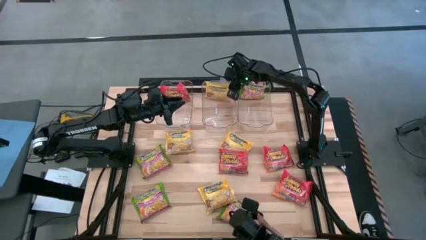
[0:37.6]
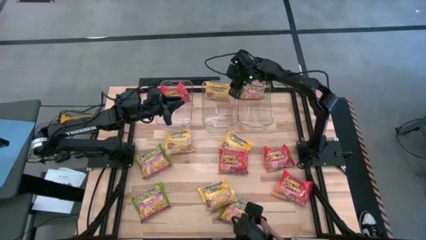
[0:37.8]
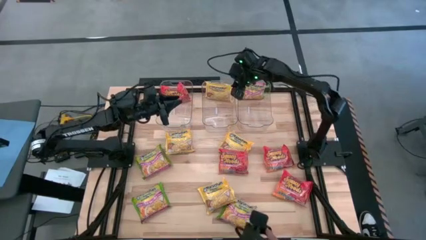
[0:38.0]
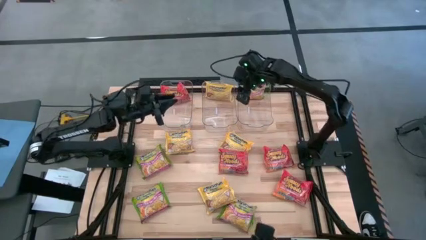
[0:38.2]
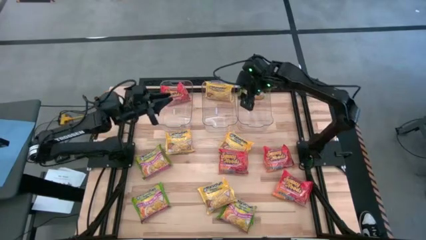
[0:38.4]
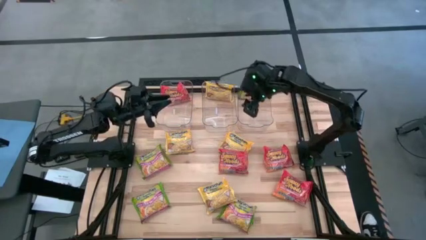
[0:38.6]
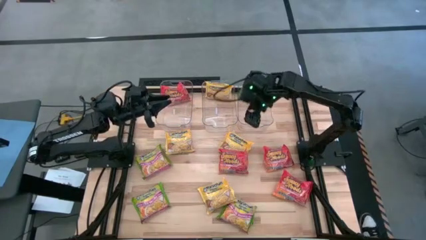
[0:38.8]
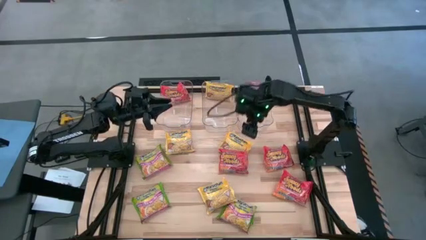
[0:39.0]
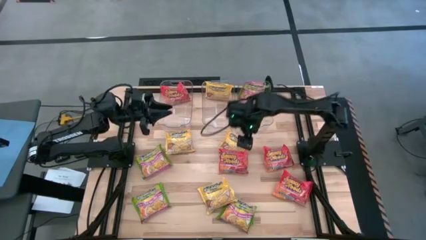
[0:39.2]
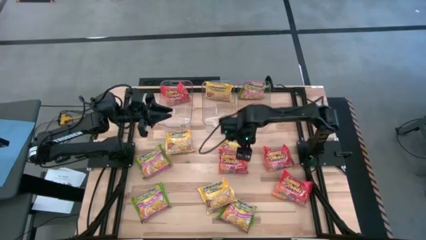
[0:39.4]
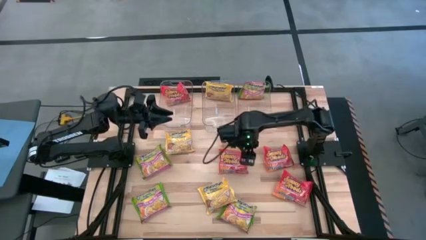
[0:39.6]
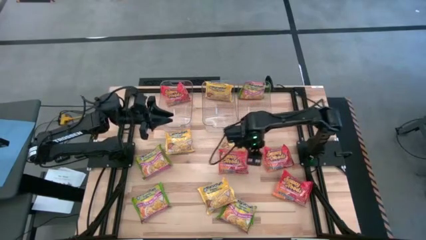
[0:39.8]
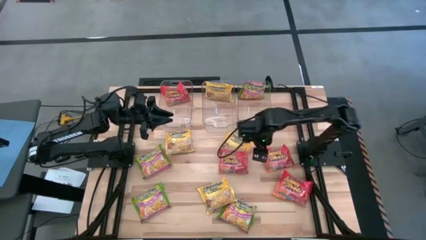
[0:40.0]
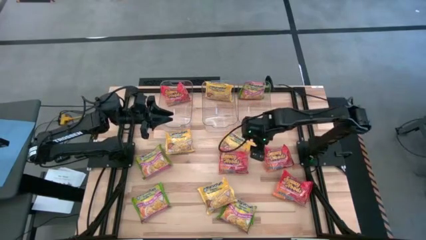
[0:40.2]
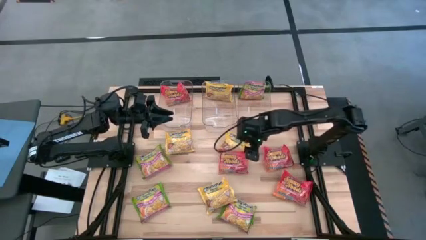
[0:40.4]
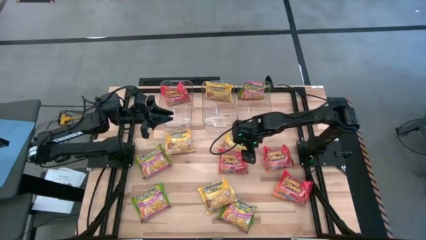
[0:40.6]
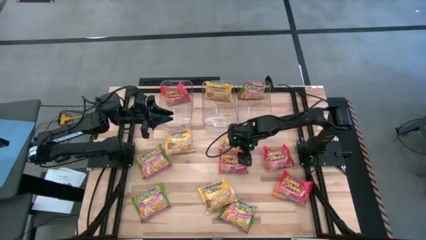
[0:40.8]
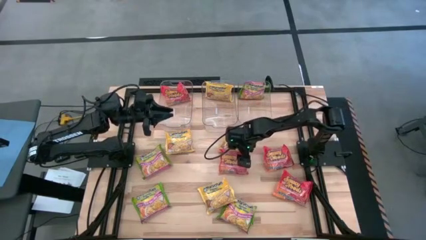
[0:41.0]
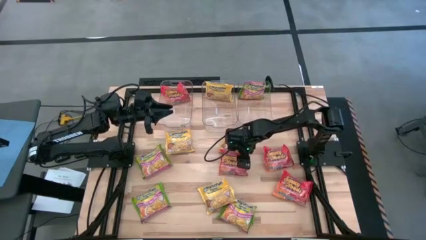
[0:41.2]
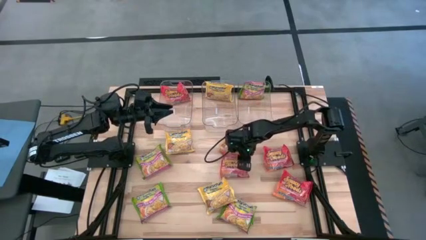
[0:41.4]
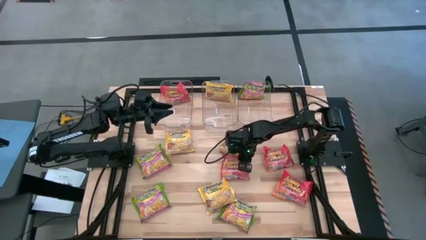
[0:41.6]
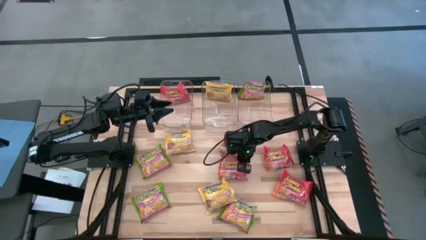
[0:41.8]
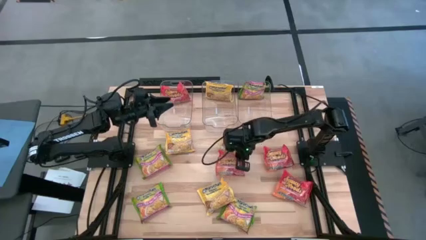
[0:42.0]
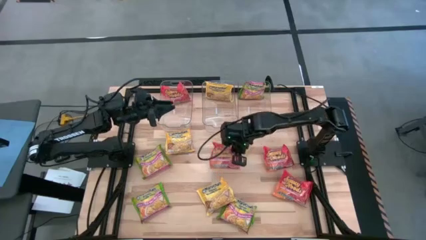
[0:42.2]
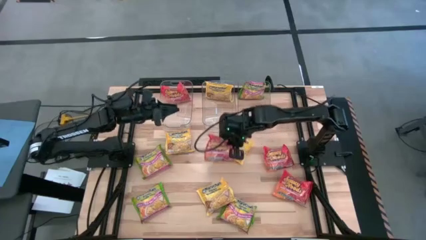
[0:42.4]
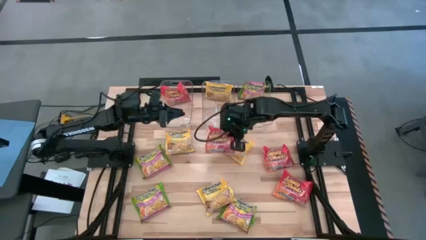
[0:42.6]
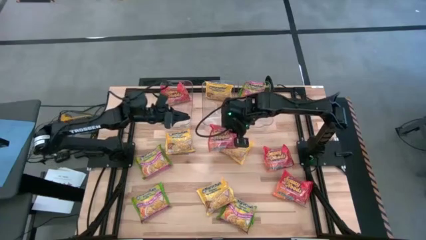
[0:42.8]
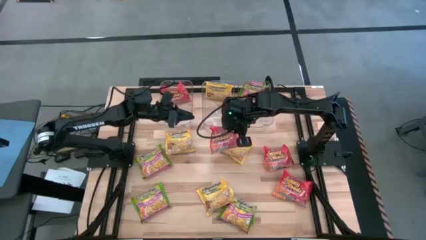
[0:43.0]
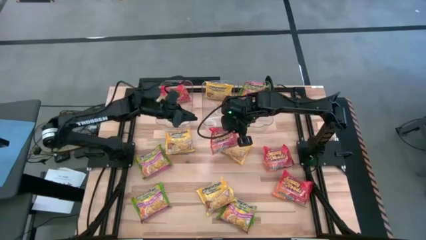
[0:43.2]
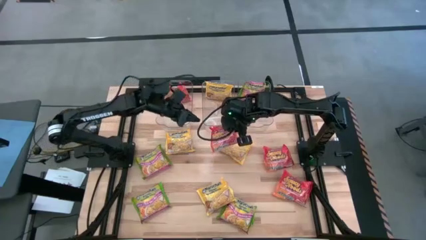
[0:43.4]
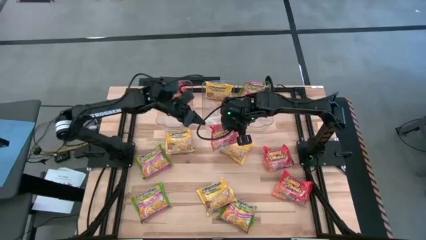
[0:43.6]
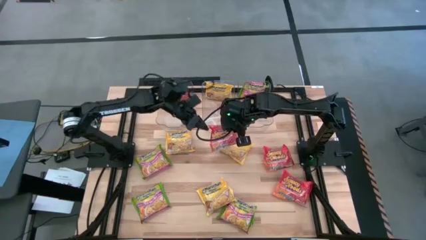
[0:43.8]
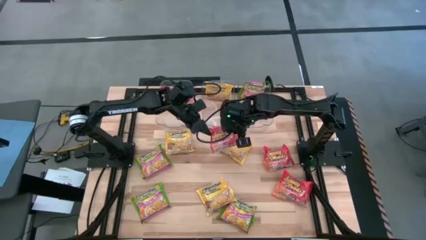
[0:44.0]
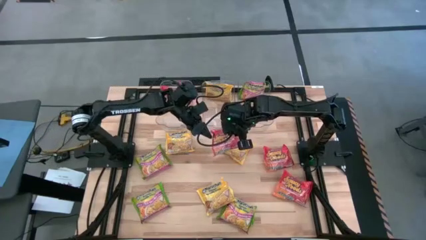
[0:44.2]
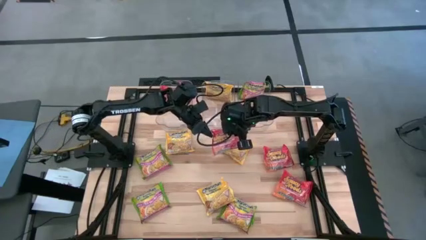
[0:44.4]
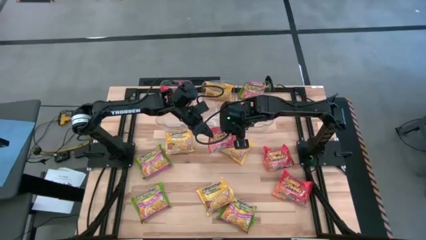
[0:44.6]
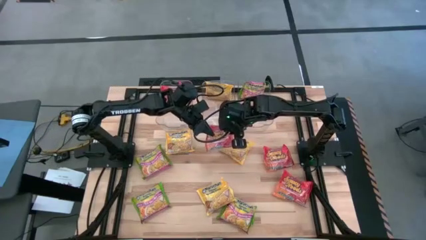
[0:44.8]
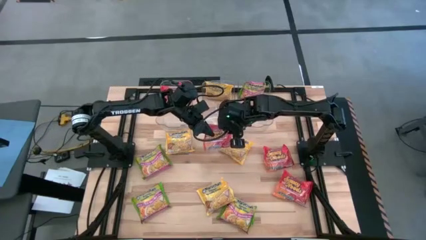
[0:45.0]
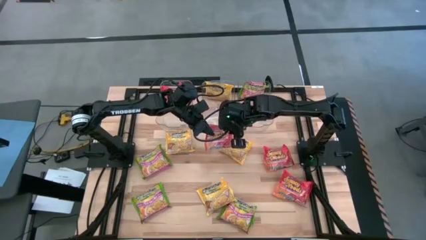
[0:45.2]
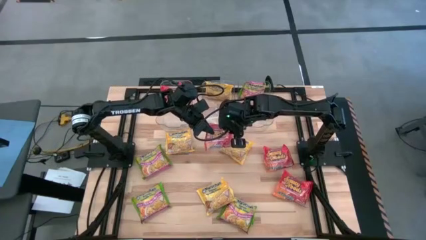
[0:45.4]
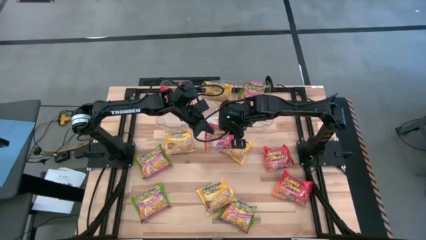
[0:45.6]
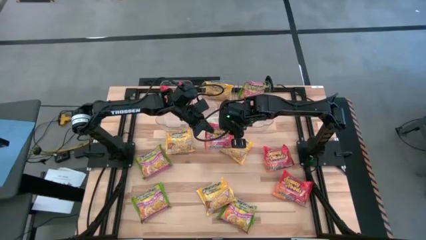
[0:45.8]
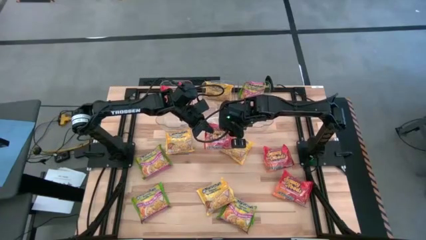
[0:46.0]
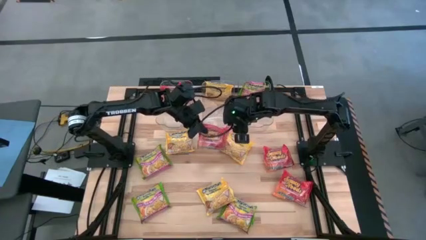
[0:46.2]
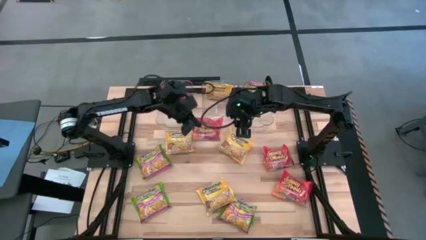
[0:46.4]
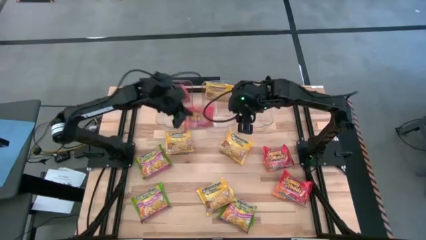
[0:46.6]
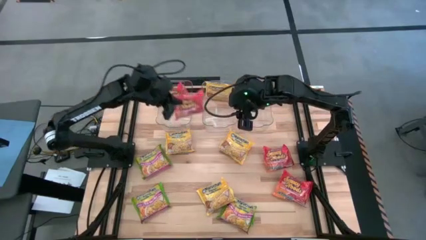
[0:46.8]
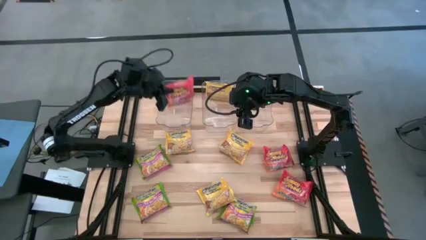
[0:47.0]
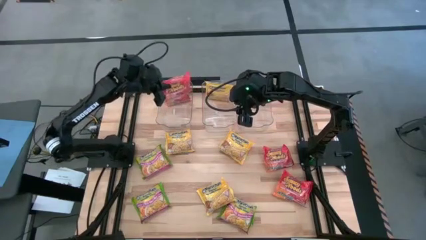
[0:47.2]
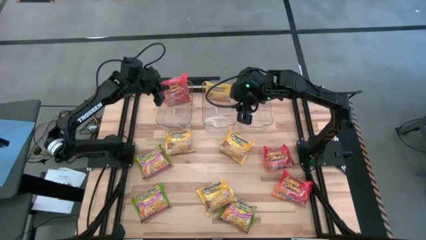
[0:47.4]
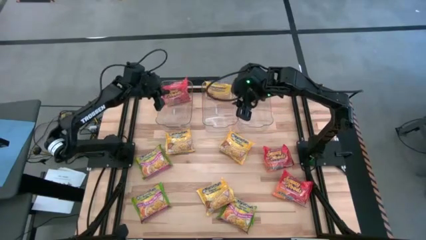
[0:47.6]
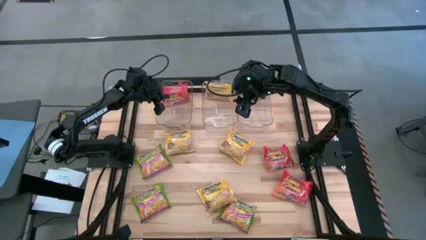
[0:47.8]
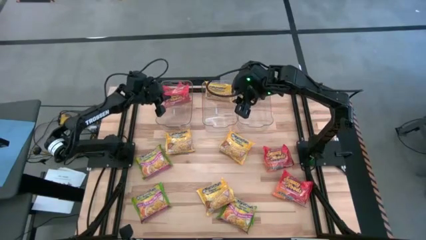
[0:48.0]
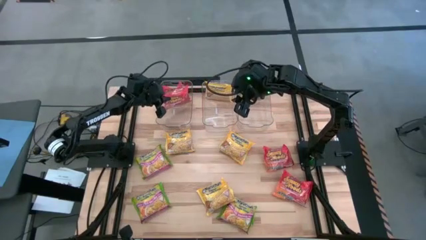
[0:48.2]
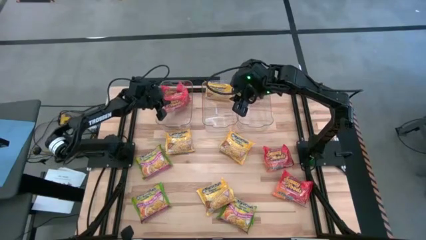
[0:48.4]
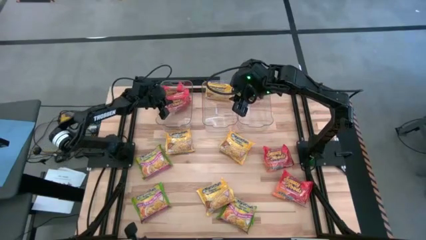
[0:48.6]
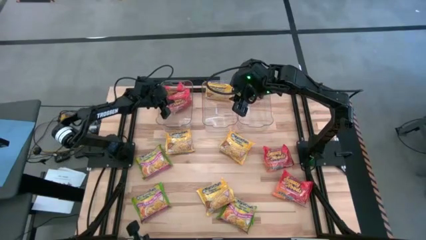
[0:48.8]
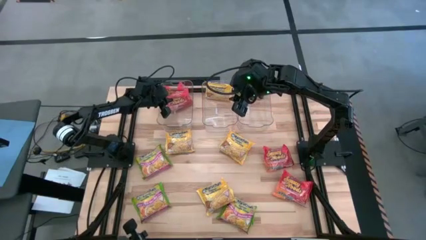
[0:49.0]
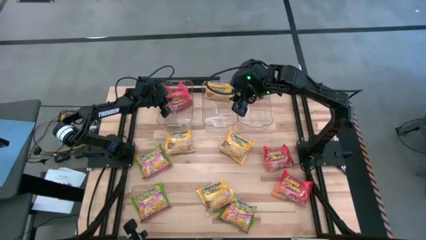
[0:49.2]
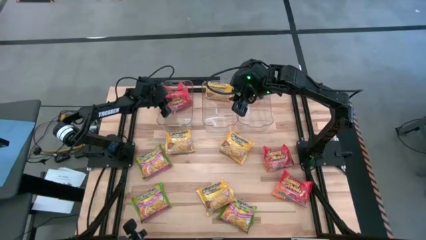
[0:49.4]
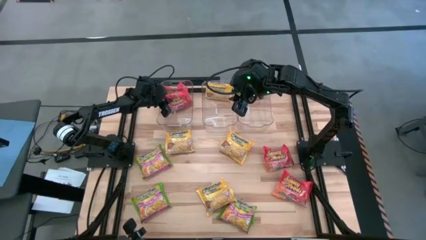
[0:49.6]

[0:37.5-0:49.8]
Task: Sort Maruchan noodles
Put the orange noodle pack into the left transparent bin

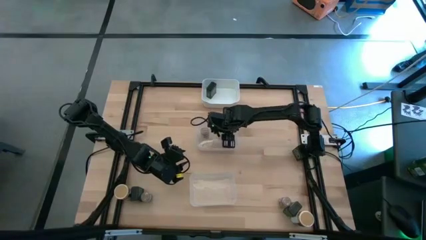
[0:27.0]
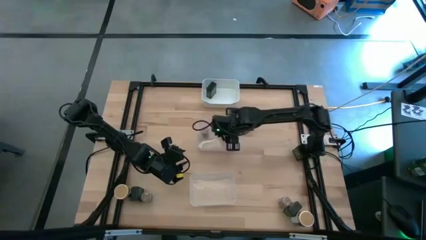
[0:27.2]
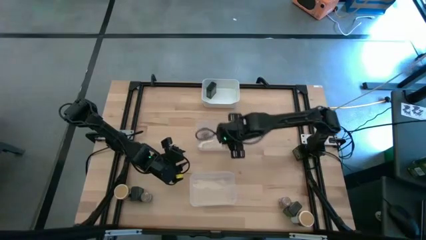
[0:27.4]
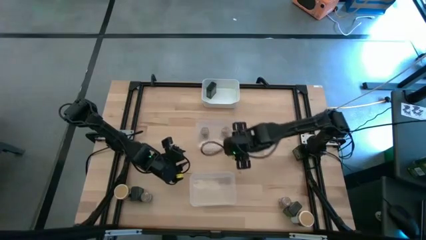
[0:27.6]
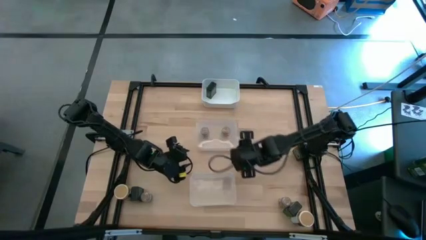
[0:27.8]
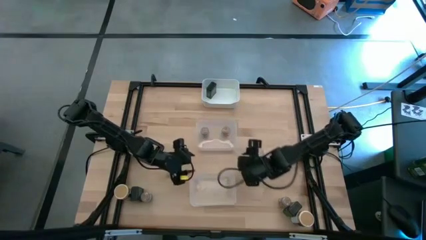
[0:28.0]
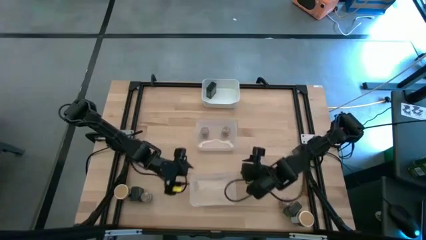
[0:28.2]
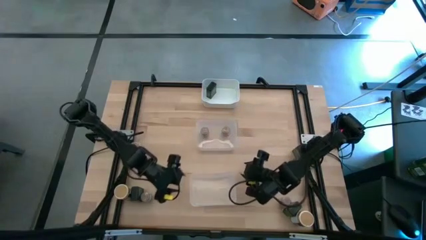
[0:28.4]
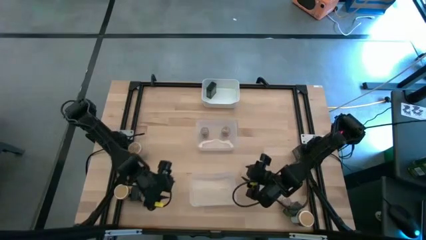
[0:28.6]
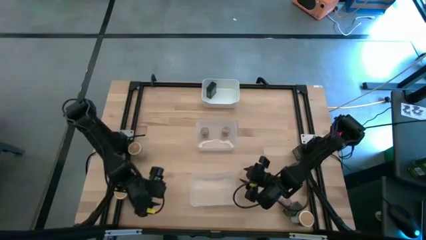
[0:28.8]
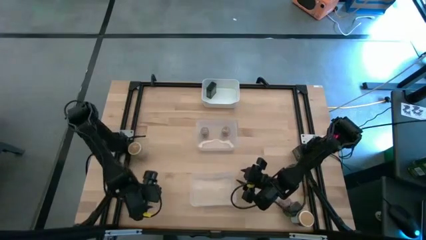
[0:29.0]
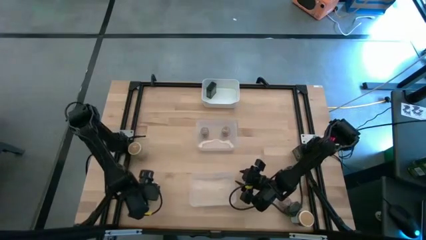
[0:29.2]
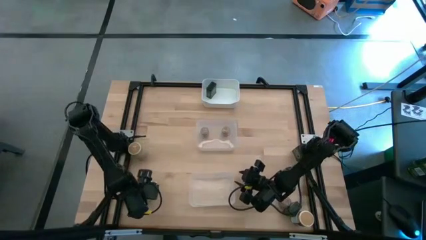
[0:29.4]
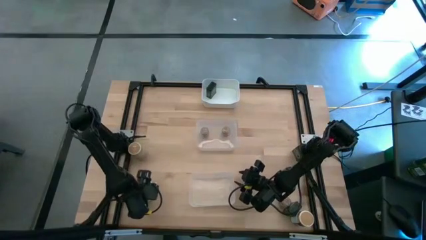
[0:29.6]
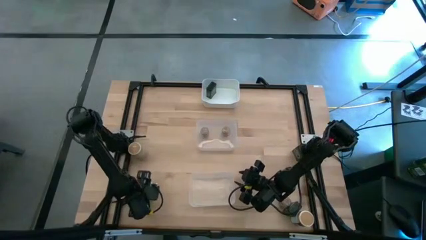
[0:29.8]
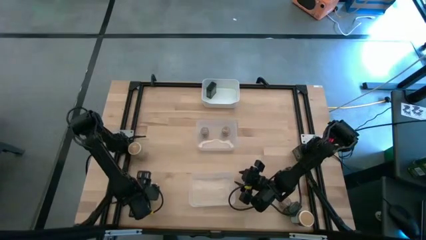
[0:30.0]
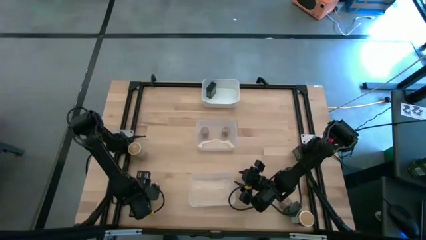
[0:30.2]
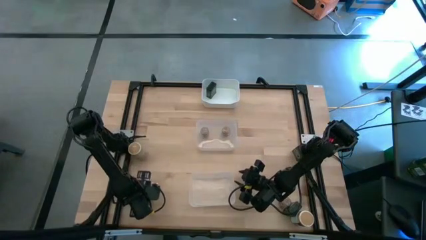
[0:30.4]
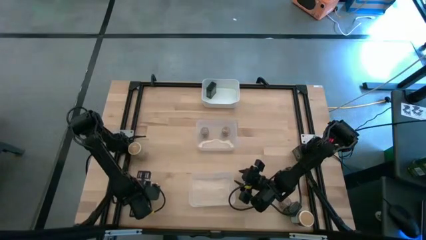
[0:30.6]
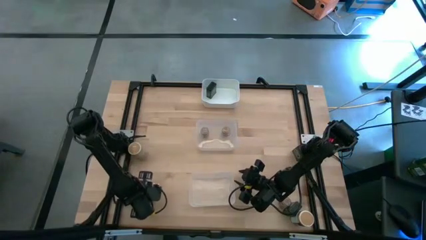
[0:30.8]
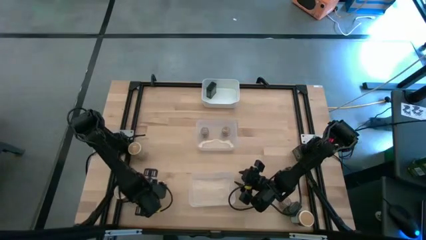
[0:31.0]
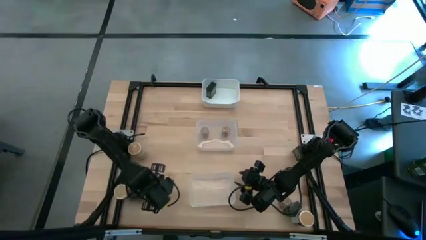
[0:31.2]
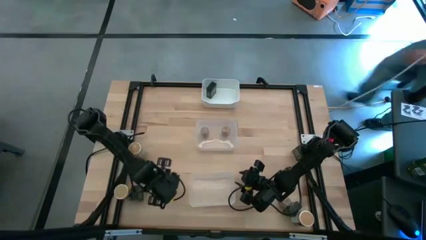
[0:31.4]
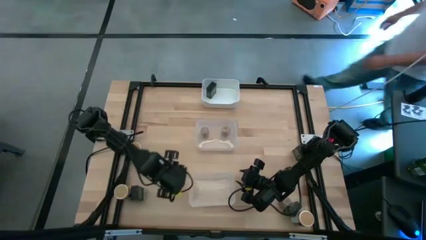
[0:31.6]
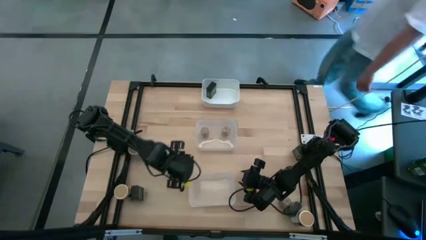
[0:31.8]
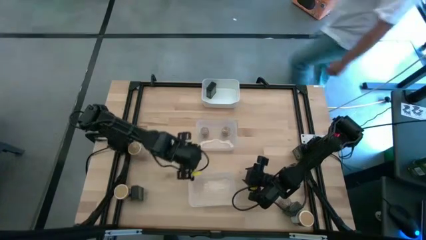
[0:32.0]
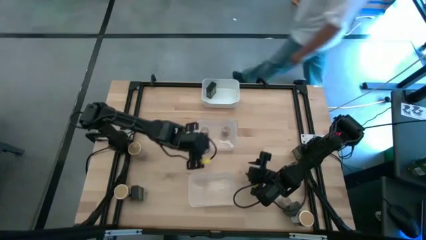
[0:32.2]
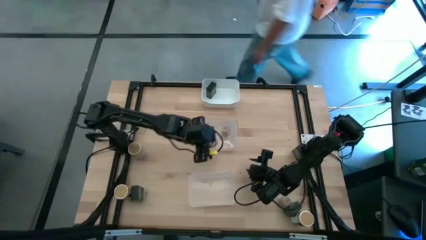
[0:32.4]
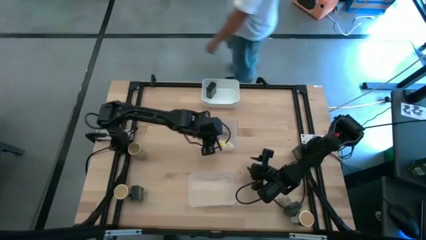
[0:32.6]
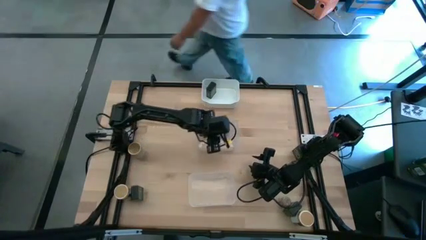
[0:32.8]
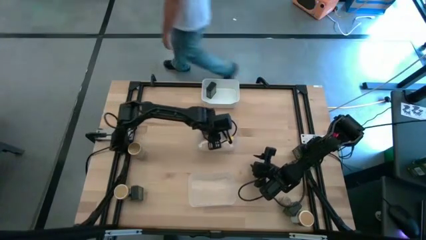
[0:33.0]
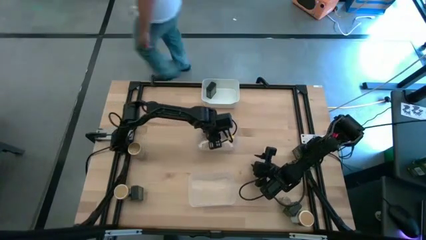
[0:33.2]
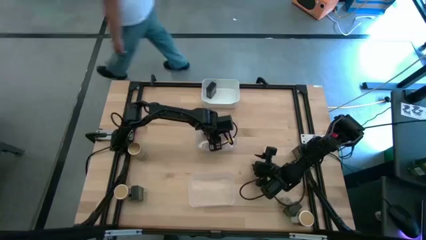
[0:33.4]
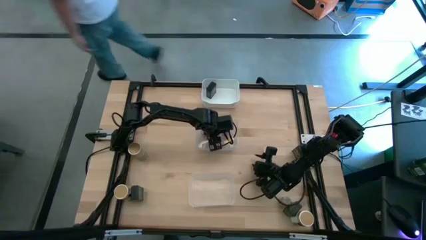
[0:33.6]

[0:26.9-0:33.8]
Task: Sort spices by type
Put the left small brown seasoning bottle into the top transparent bin
